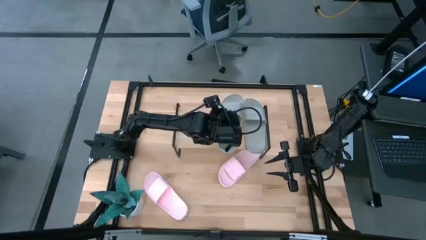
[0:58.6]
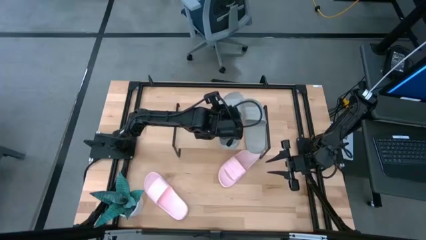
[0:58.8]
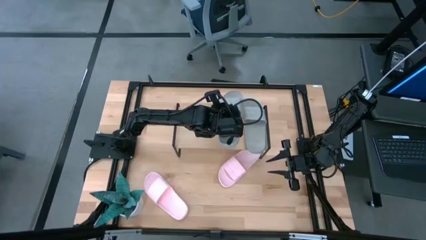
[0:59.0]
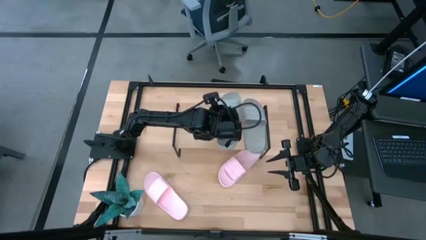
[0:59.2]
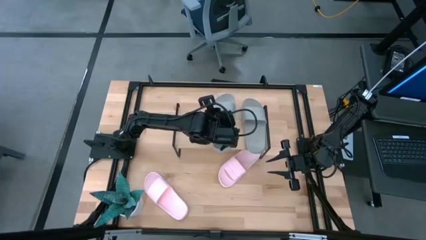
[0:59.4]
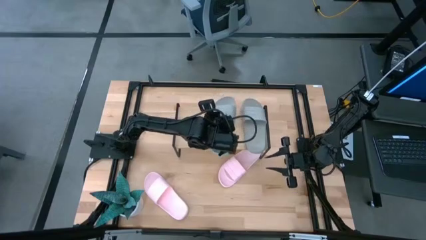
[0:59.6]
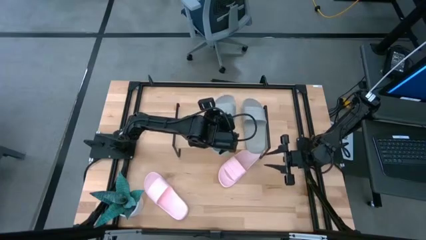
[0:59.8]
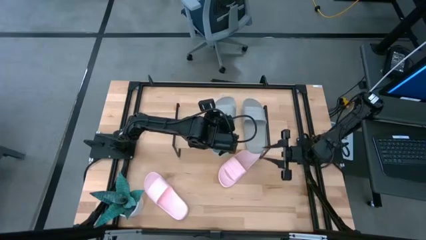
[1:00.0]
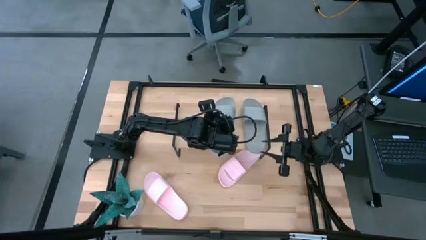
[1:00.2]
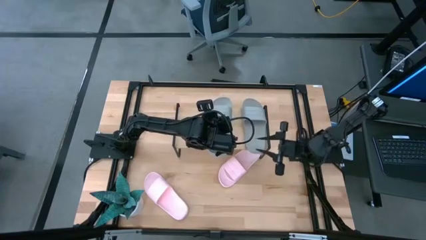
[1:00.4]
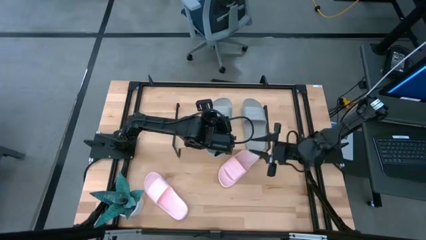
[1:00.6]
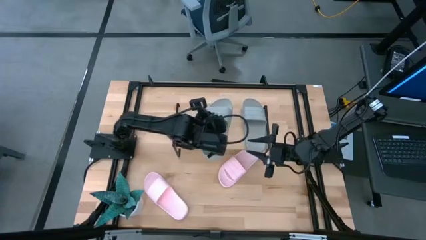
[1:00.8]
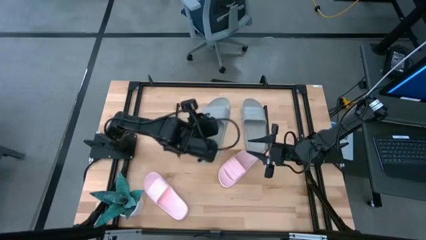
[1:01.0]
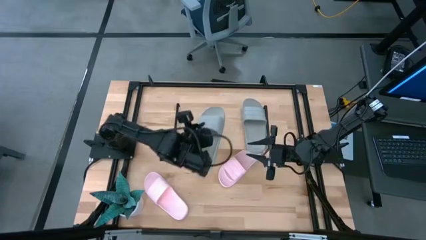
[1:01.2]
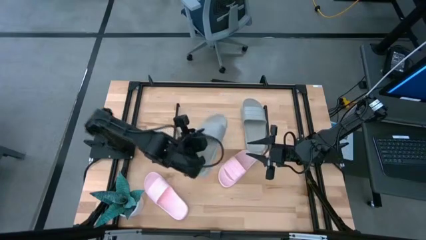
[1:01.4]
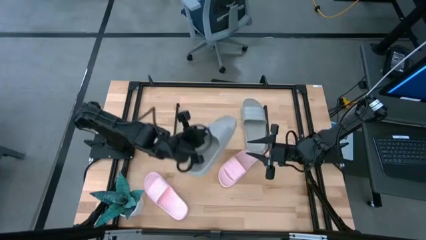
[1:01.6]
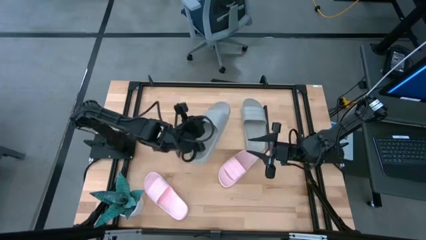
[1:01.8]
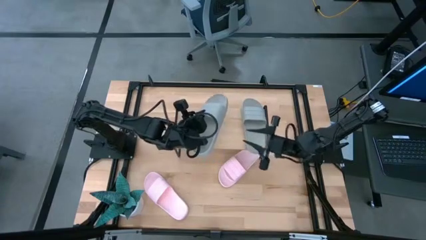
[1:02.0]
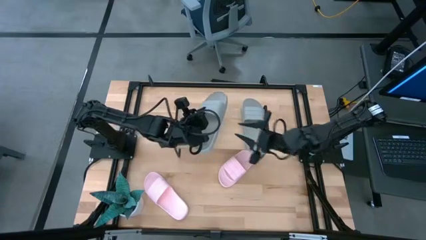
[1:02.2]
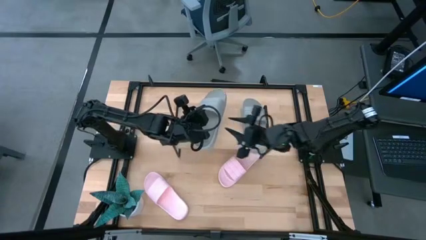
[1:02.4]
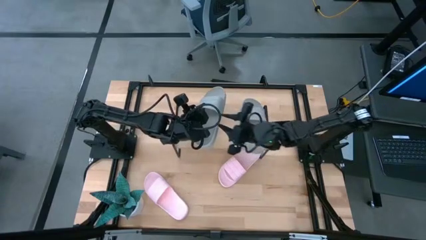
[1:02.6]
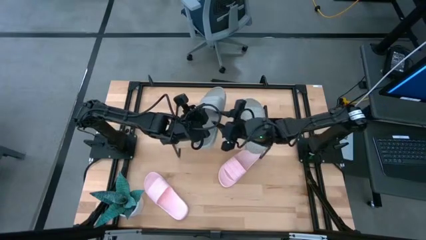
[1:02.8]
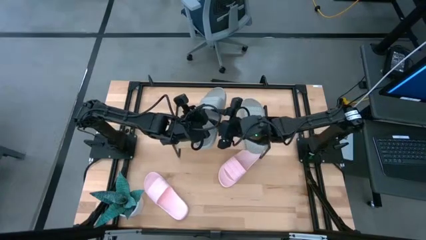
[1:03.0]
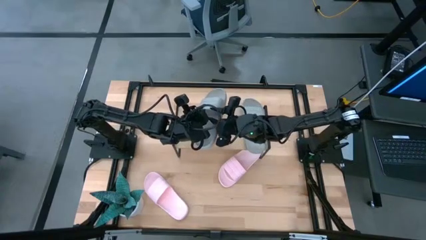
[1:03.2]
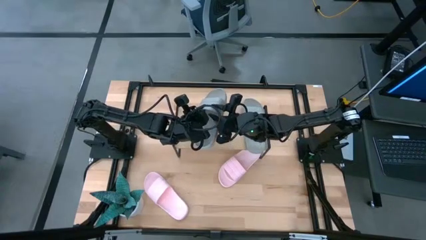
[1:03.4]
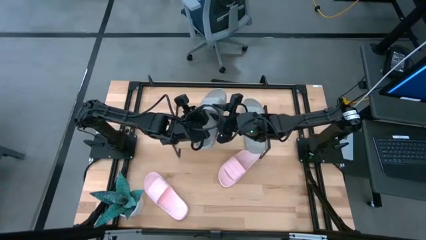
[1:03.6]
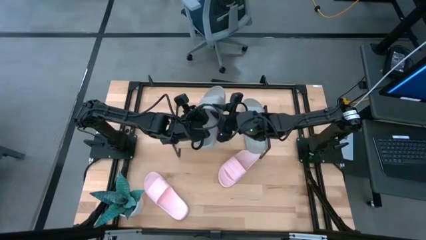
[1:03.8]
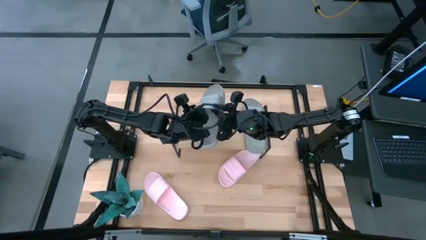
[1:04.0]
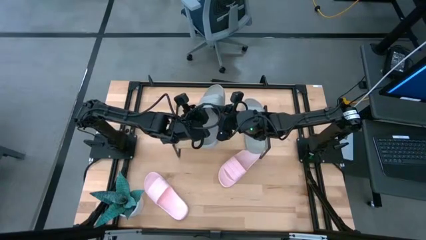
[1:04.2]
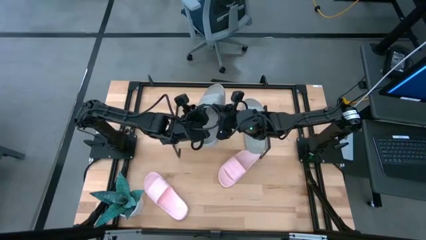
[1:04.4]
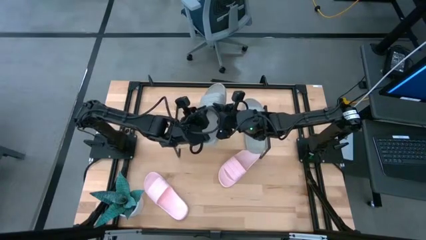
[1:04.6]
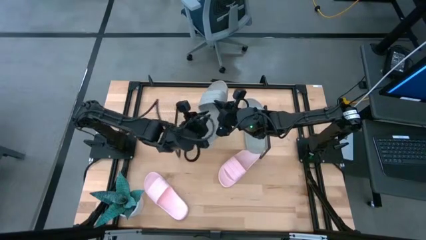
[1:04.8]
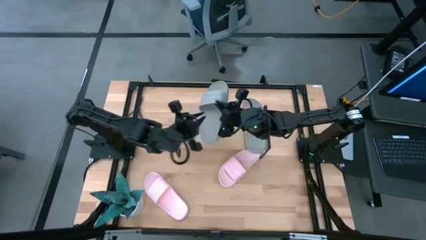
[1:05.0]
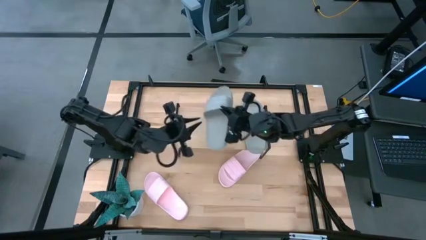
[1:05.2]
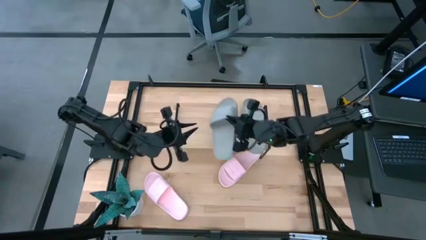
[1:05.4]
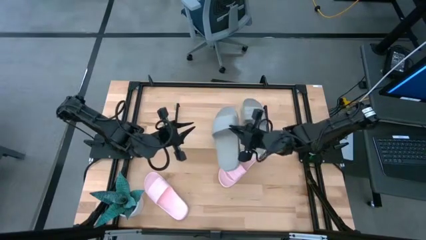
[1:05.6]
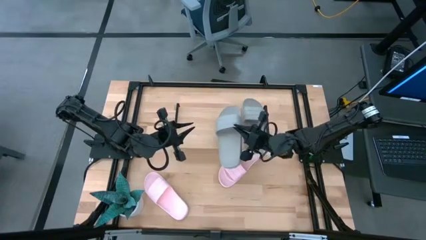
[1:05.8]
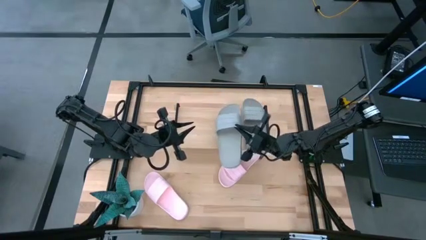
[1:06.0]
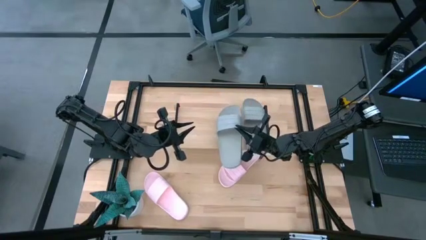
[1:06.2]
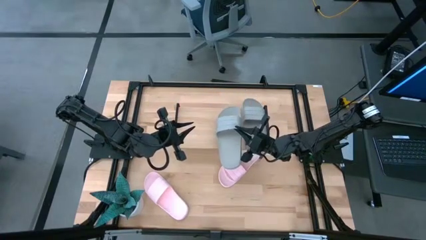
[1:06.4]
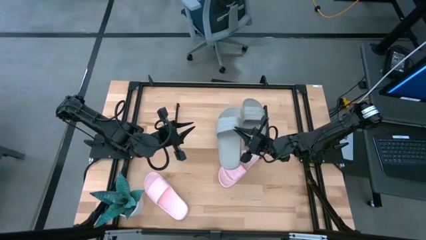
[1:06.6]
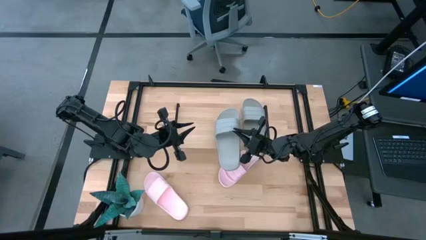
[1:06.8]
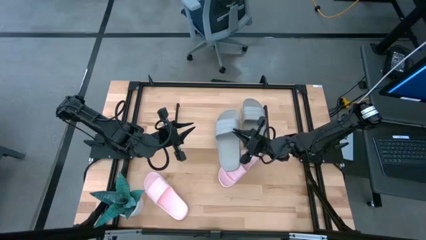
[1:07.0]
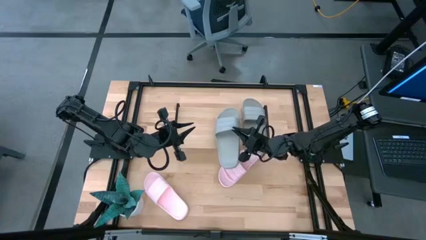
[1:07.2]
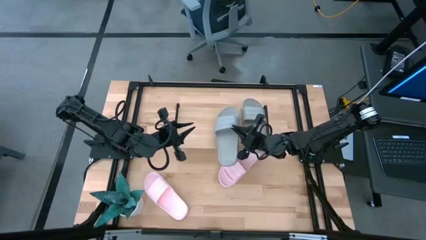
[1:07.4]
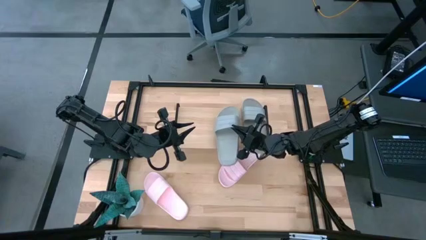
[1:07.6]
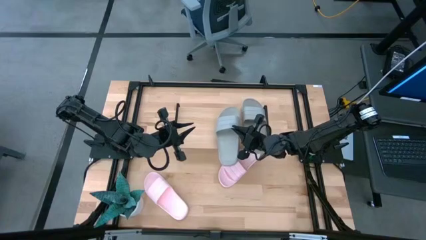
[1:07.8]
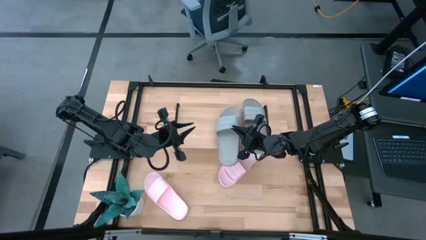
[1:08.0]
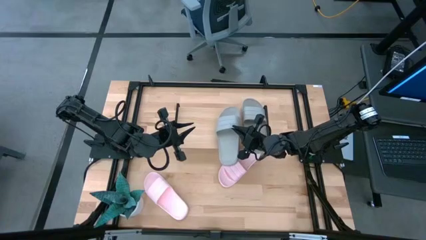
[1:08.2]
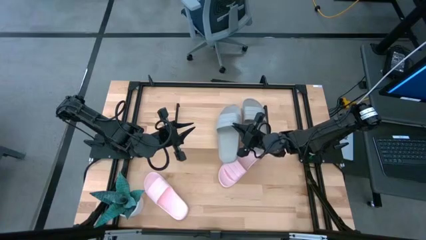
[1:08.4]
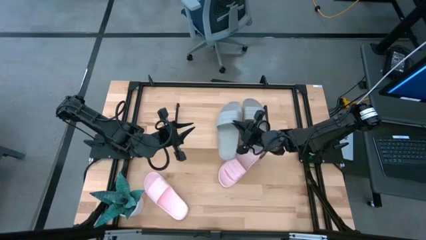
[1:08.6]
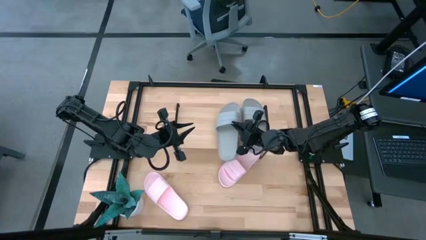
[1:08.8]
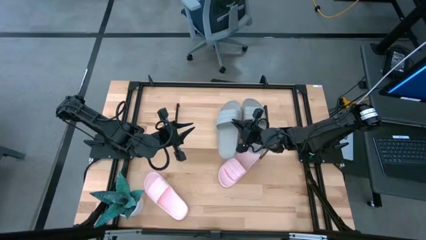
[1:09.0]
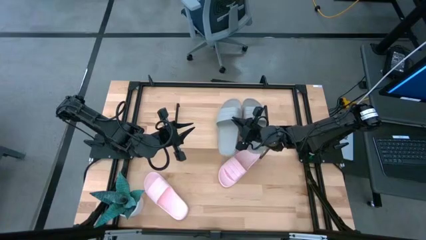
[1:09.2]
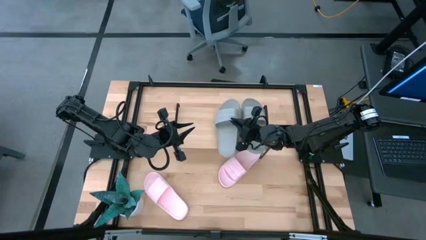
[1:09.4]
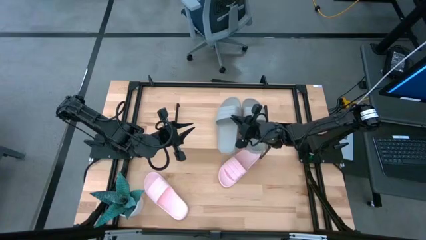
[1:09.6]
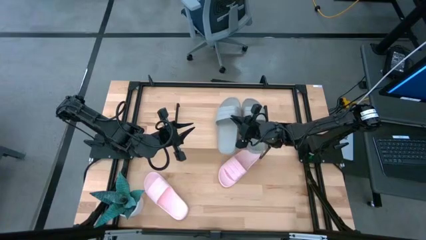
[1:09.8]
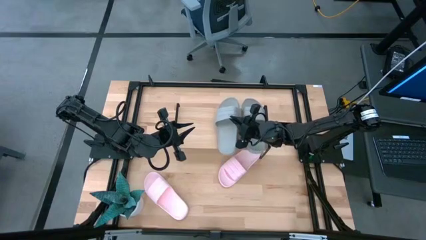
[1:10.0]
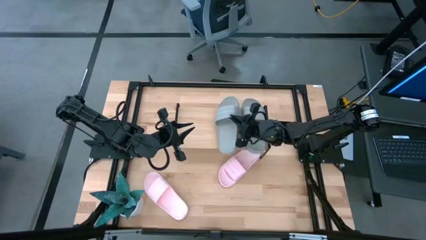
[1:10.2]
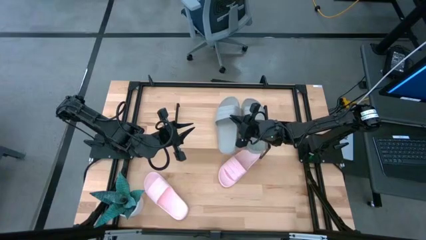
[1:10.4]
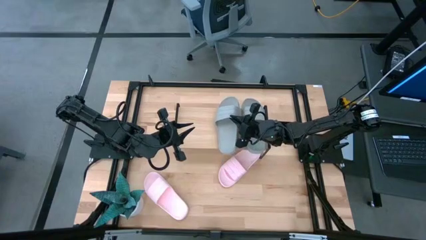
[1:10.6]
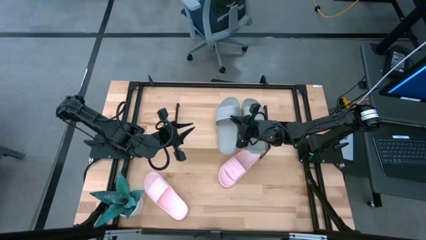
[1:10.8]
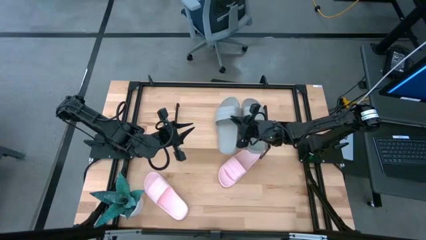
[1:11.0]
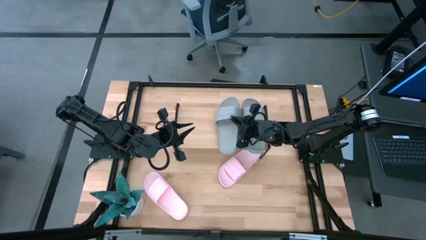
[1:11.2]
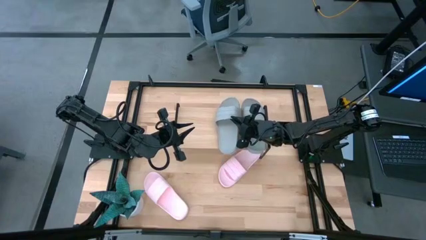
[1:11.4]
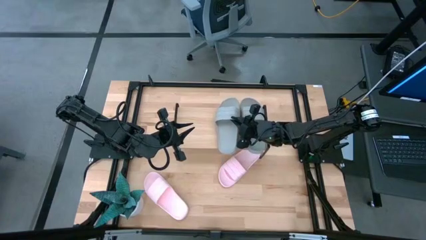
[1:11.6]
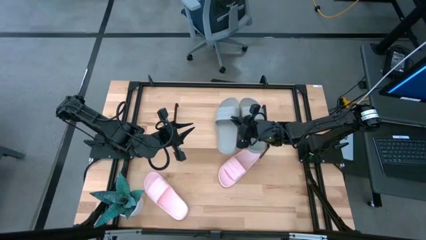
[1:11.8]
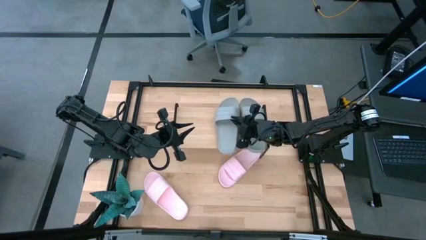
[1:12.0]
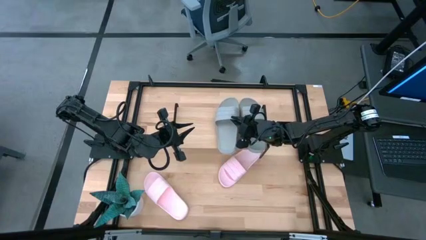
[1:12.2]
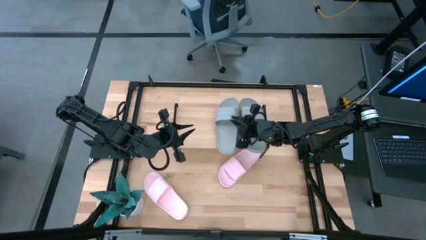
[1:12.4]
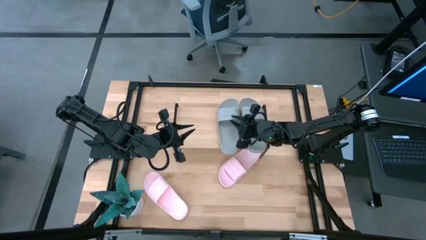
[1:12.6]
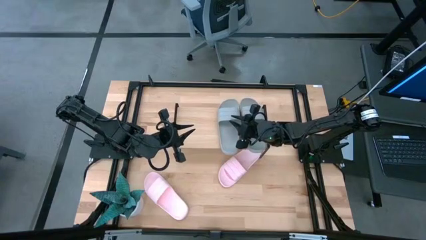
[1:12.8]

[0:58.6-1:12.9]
Task: Pick and place slides into the shelf
Put the gray slide on the shelf

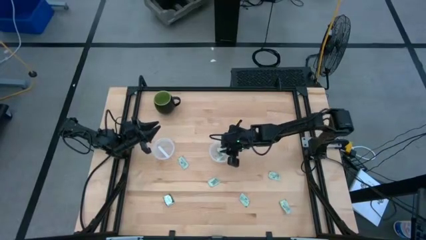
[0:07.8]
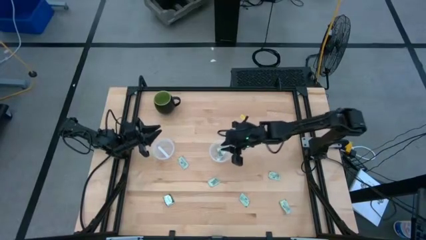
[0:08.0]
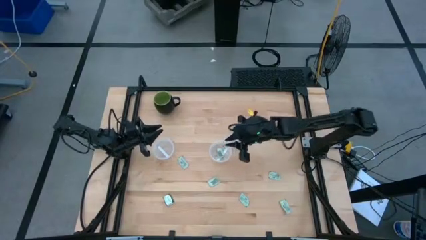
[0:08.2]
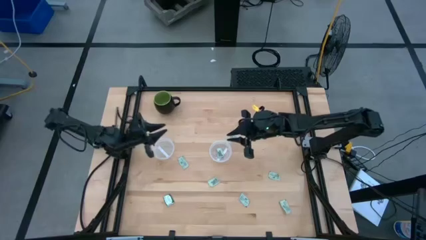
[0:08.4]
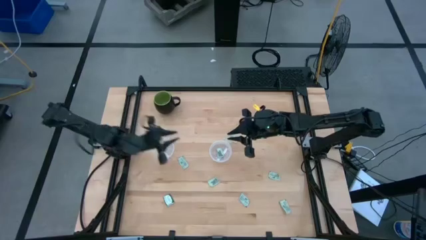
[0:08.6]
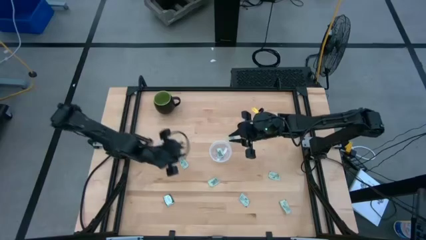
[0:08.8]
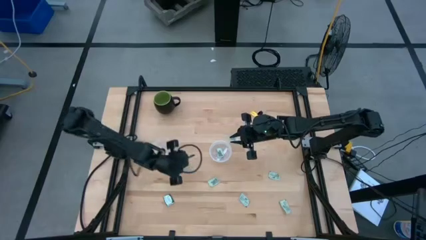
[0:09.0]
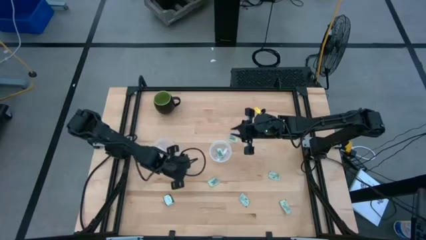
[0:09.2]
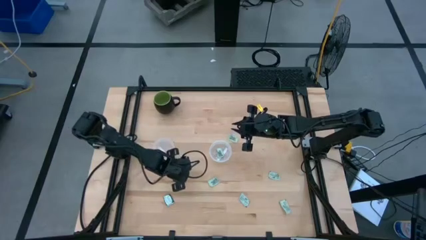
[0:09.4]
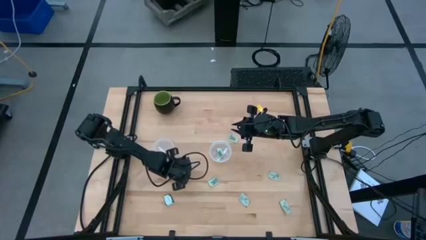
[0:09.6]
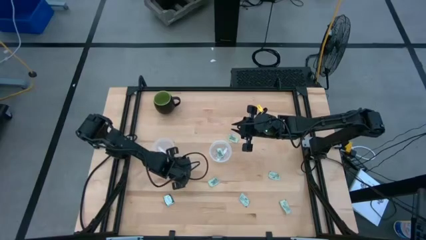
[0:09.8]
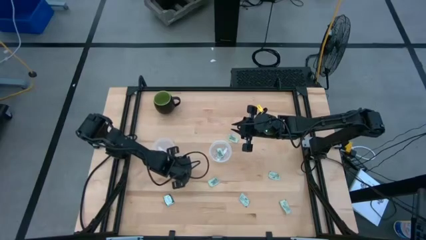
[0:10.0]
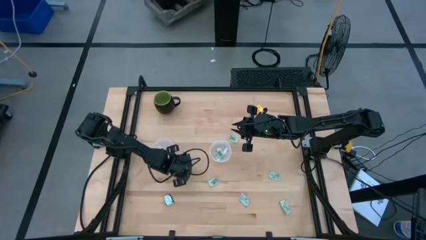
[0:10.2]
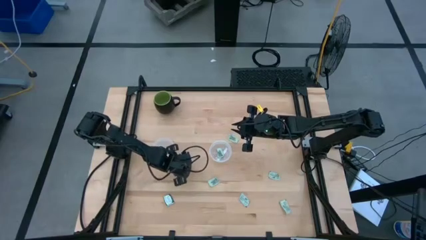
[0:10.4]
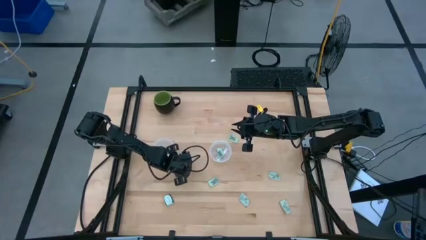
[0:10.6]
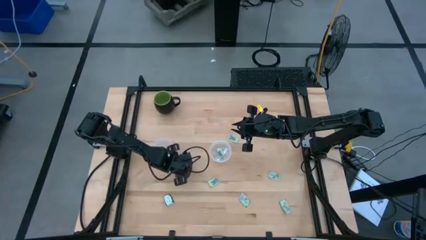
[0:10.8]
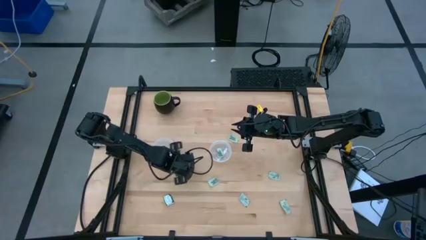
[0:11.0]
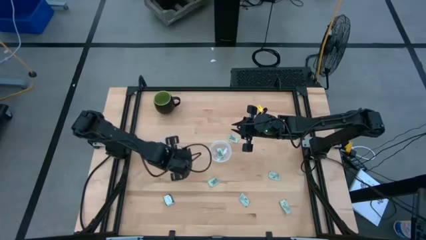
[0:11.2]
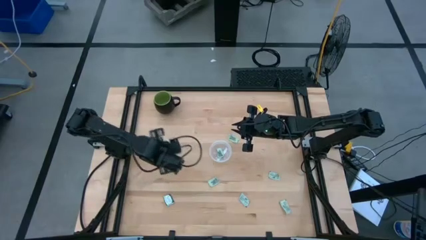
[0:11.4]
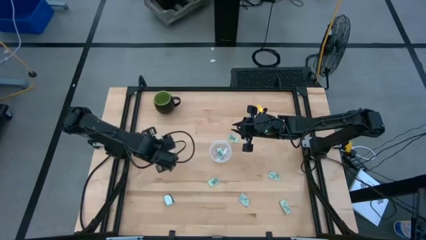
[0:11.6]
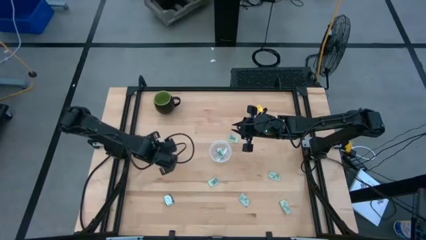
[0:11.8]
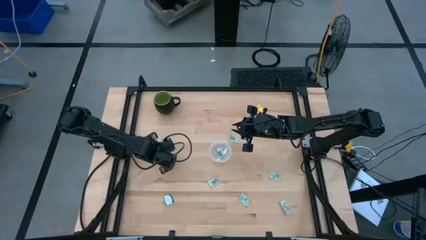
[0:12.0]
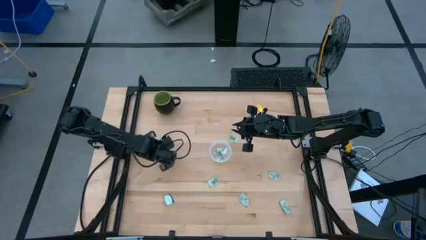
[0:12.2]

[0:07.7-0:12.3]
Task: Pick and place Stevia / Truvia into bins
Put the white stevia packet into the left transparent container
